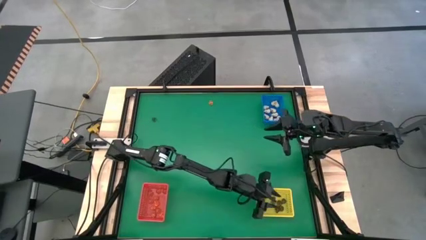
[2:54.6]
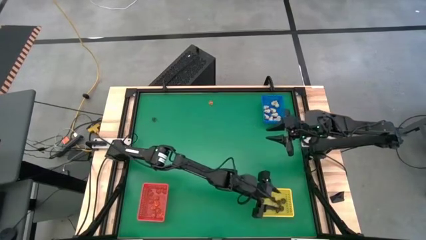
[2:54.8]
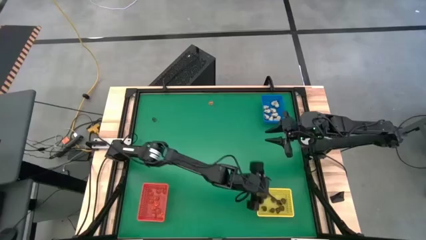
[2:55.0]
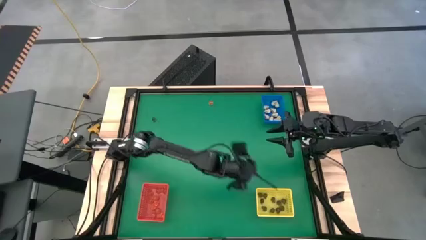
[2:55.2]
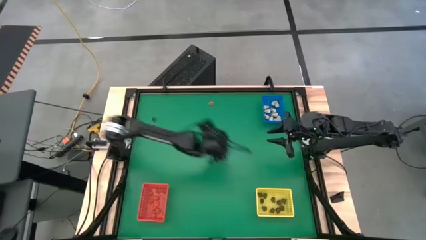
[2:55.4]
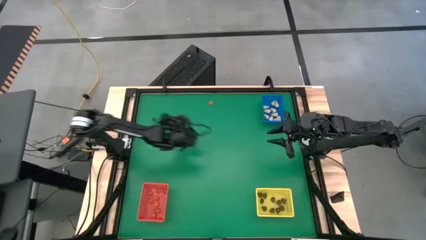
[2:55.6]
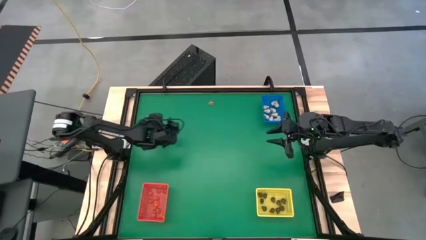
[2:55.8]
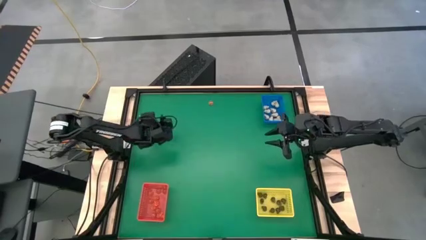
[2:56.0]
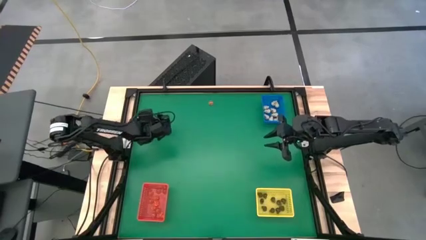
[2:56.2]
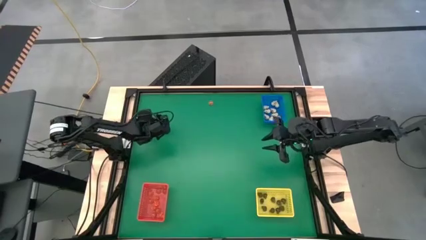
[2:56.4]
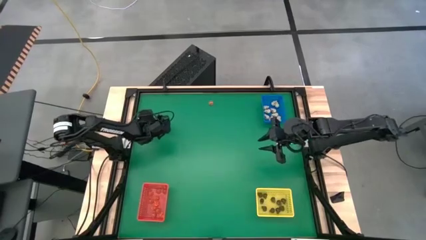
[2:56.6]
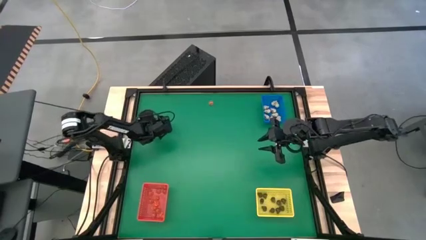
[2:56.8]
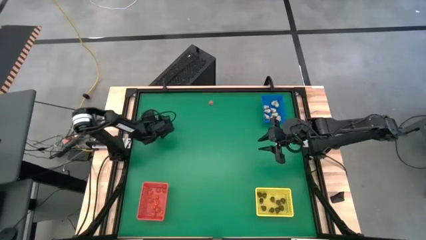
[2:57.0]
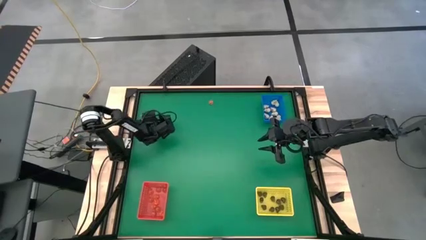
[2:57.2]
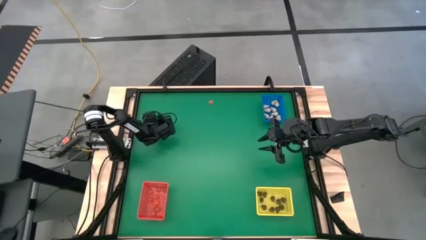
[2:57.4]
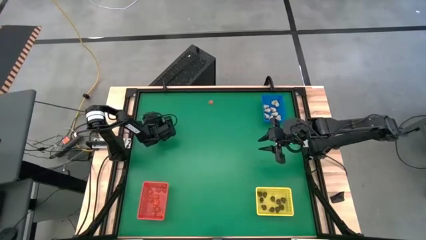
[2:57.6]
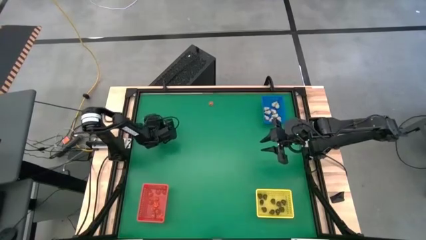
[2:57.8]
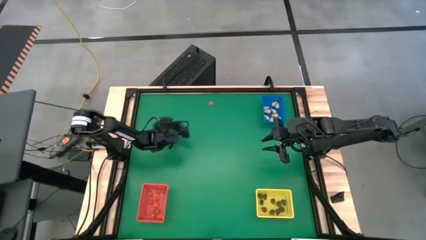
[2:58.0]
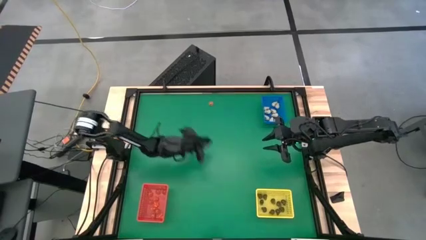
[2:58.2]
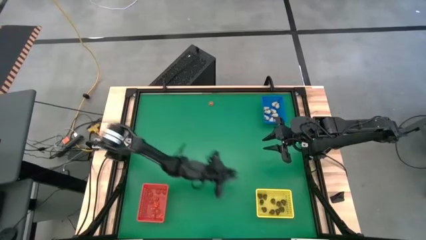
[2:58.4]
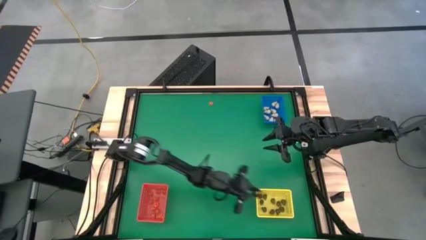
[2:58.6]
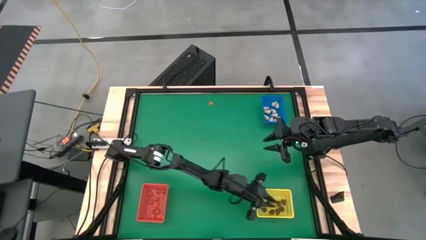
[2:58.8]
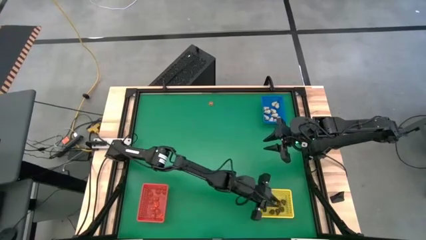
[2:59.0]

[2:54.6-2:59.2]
Task: Sort Halloween decoration
Put the black skull toy into the yellow bin

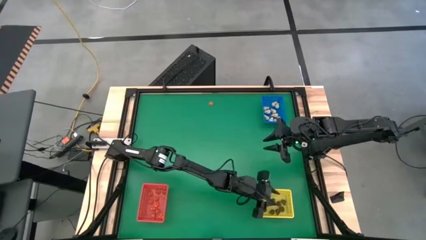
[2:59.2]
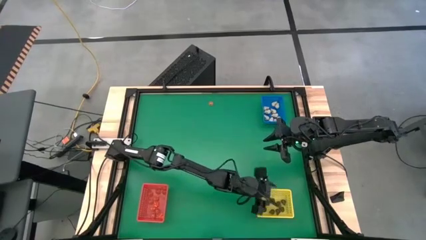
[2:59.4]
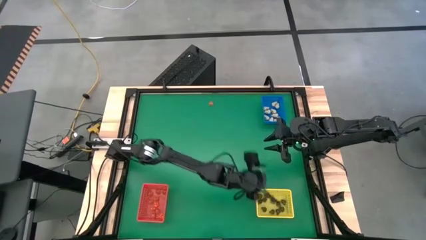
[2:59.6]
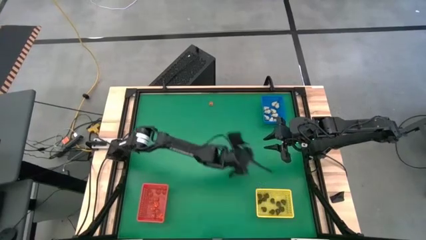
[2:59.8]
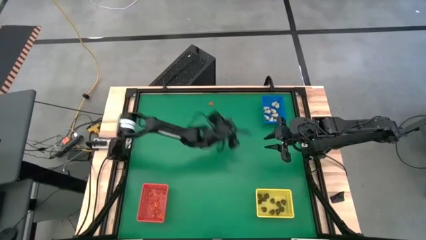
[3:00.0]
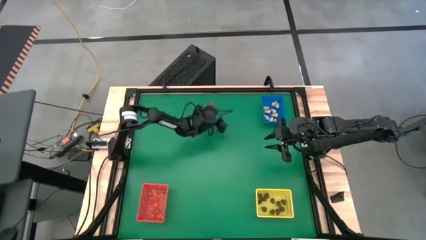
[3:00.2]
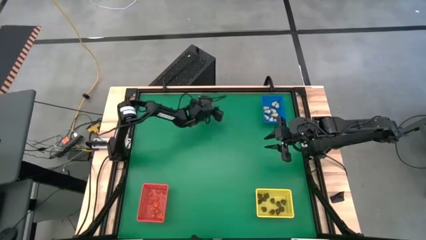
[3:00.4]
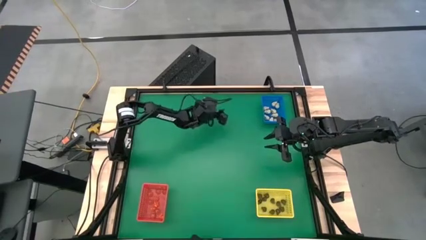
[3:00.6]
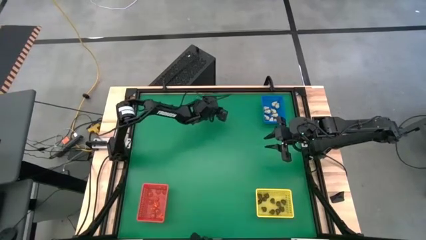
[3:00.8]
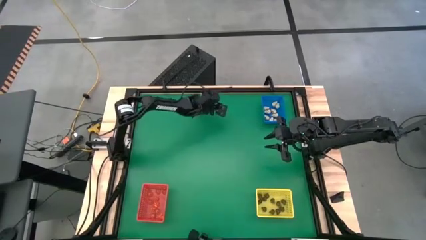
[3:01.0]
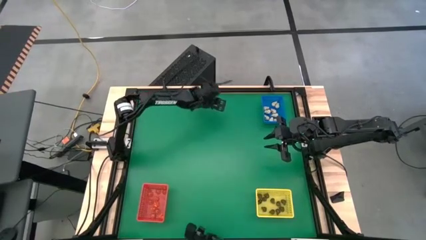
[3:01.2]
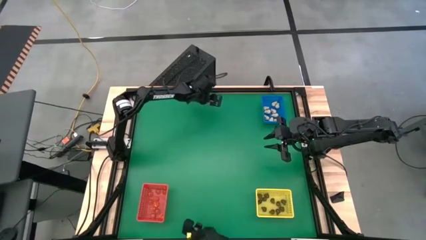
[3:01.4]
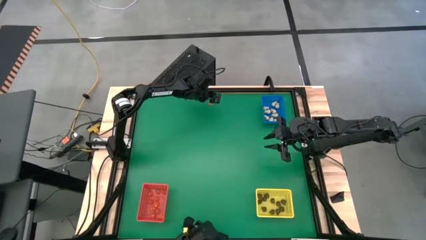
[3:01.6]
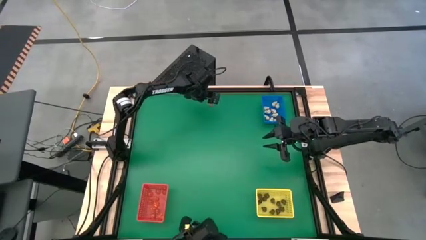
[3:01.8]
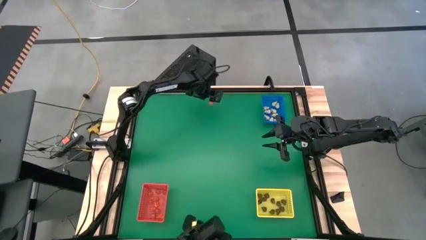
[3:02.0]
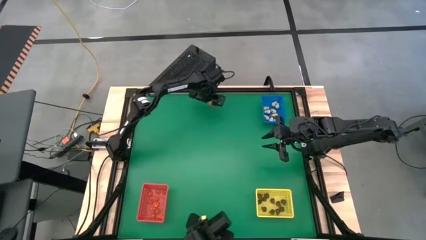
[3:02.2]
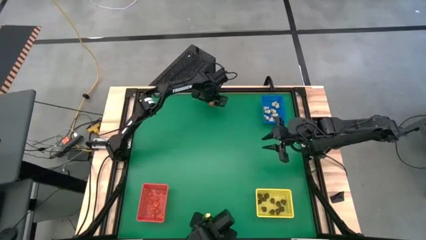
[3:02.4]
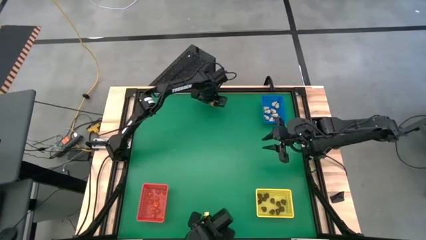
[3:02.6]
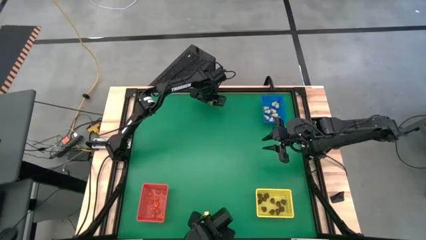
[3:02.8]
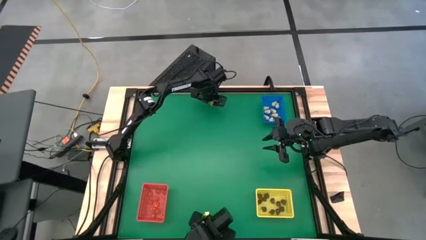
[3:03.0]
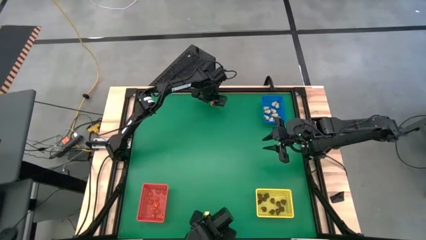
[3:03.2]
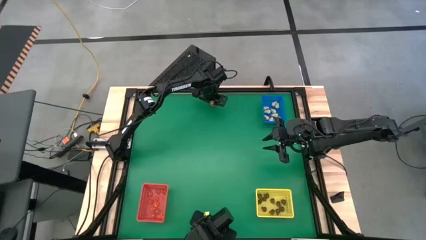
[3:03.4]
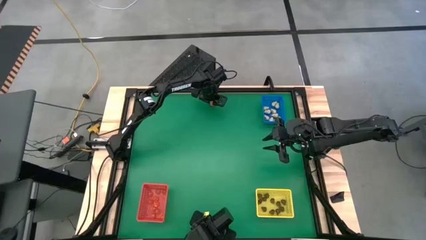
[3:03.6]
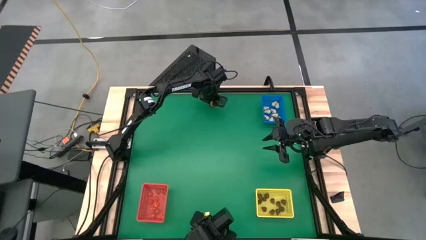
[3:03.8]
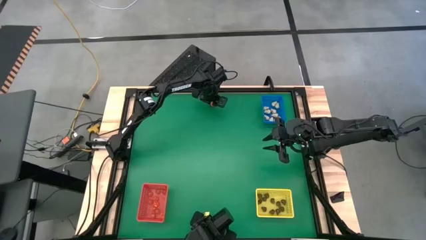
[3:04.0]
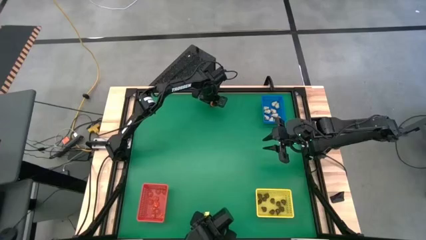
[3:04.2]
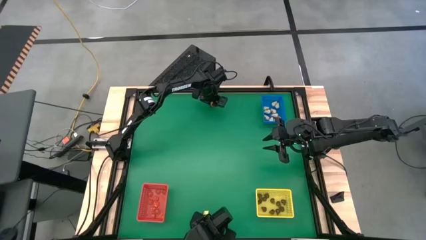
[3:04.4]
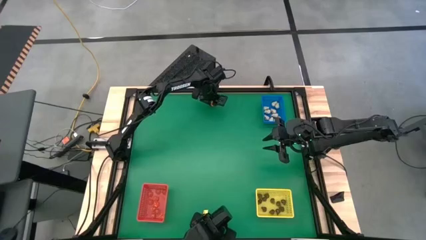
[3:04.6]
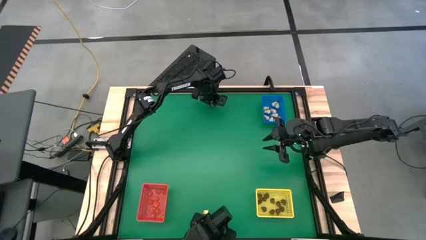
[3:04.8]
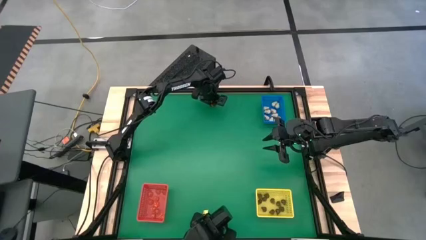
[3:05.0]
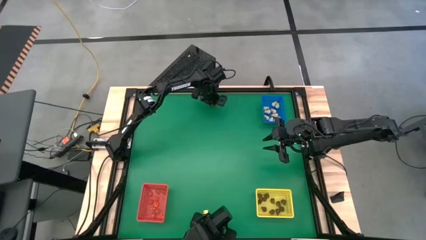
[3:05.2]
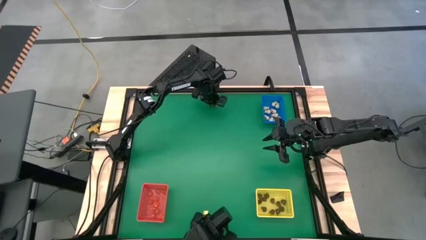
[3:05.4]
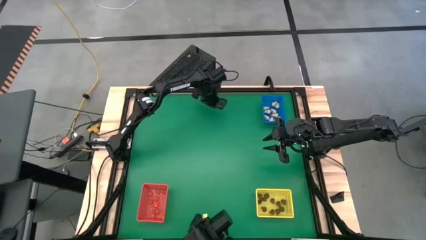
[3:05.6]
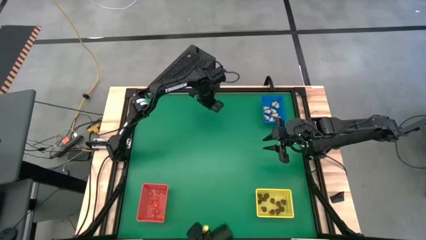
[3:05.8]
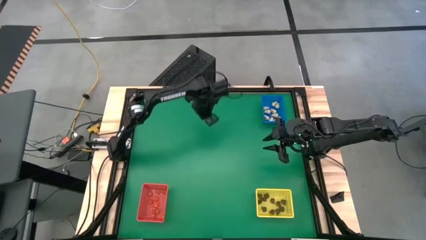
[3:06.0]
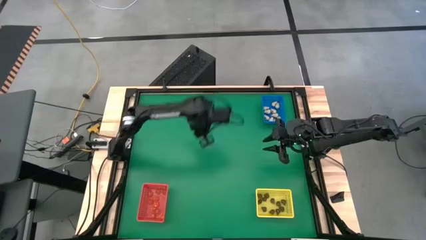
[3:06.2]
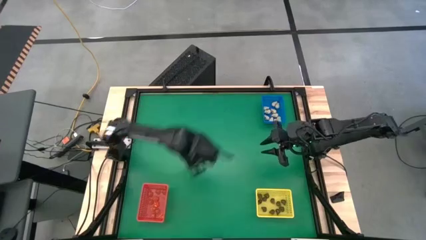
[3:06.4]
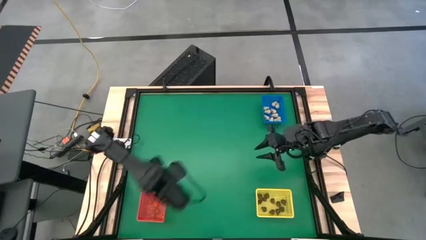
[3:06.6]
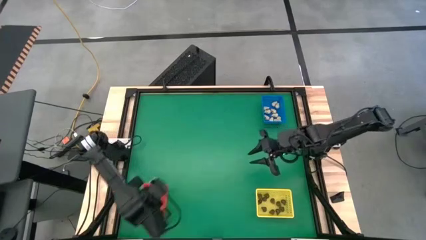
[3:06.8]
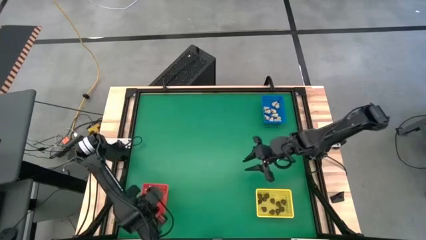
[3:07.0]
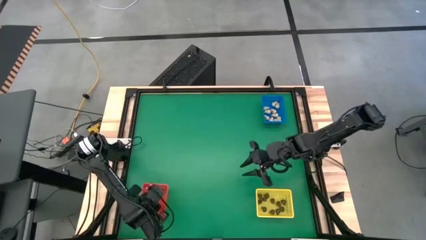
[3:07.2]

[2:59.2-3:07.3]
Put the orange pumpkin toy into the red bin

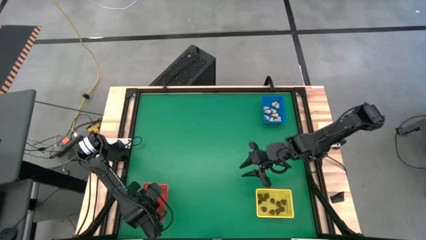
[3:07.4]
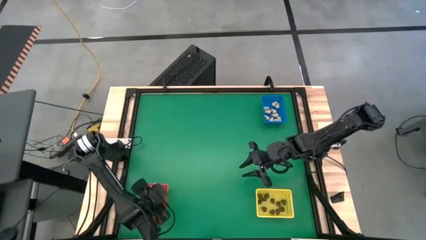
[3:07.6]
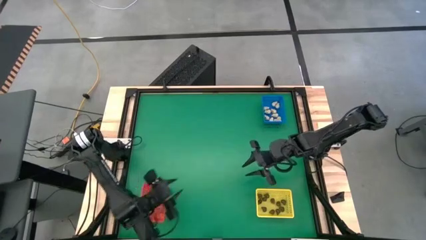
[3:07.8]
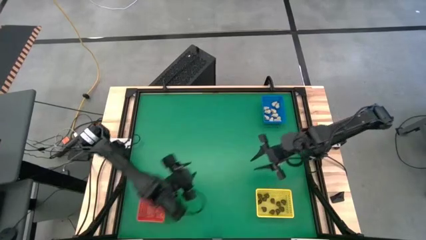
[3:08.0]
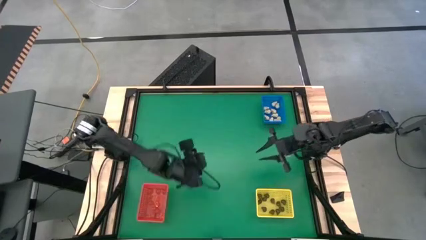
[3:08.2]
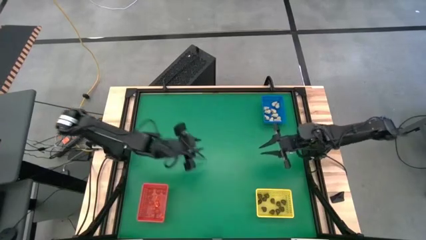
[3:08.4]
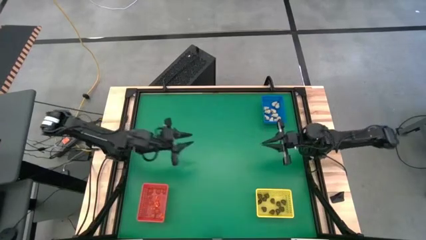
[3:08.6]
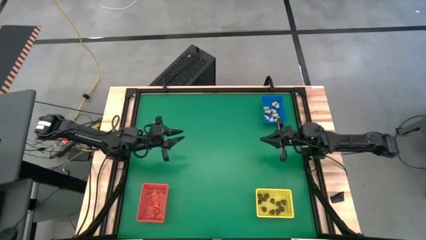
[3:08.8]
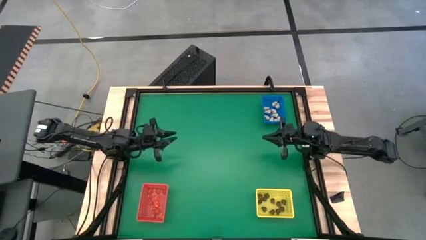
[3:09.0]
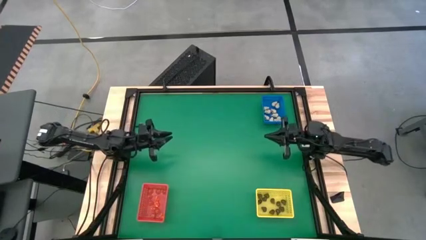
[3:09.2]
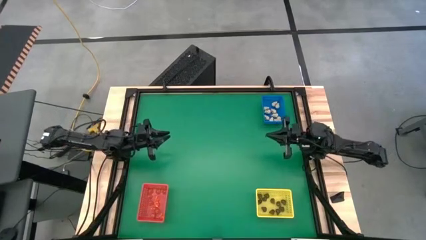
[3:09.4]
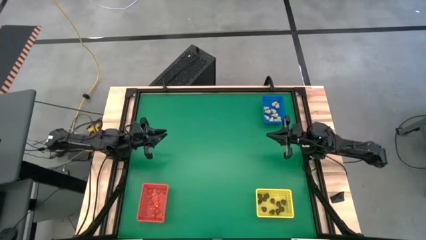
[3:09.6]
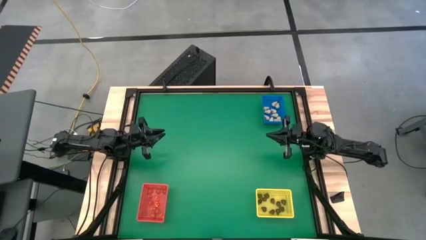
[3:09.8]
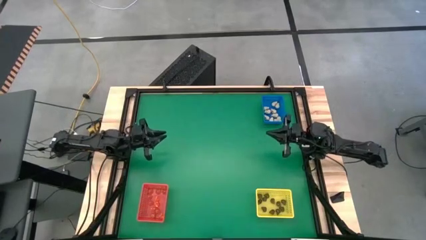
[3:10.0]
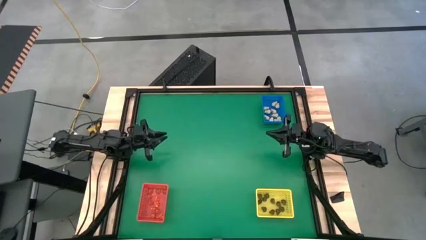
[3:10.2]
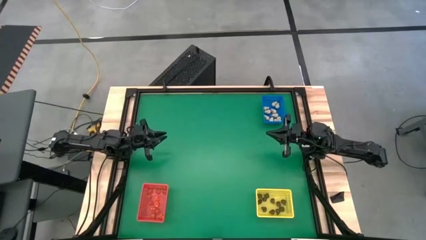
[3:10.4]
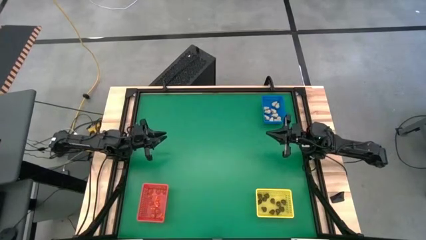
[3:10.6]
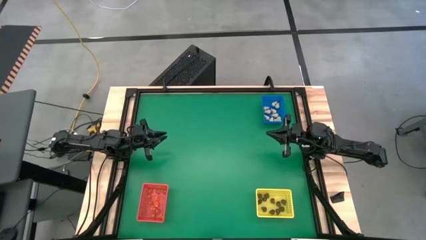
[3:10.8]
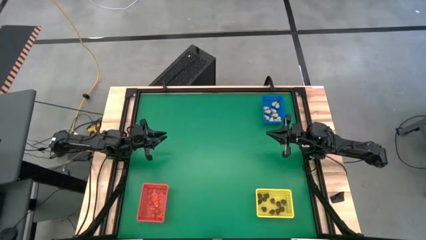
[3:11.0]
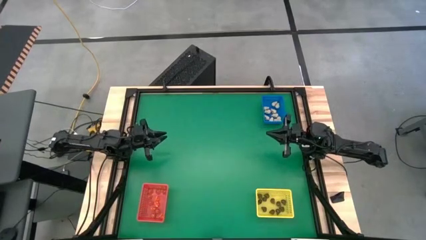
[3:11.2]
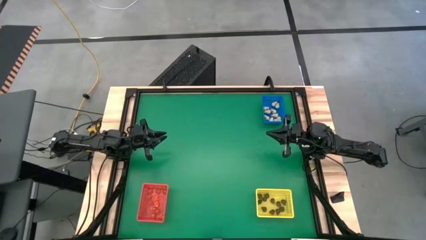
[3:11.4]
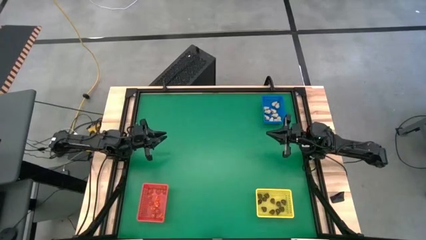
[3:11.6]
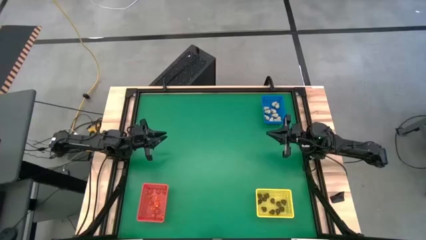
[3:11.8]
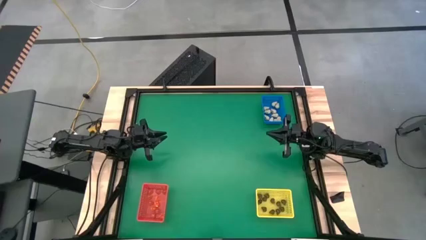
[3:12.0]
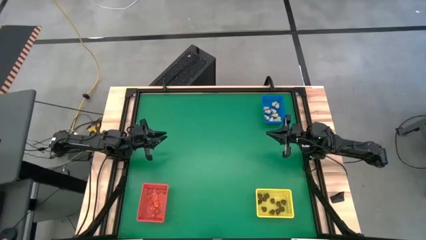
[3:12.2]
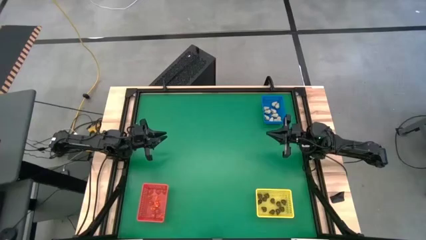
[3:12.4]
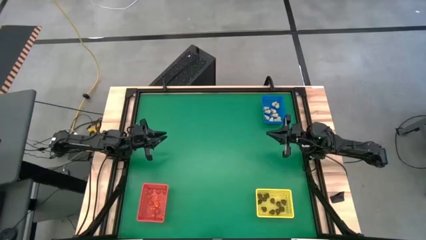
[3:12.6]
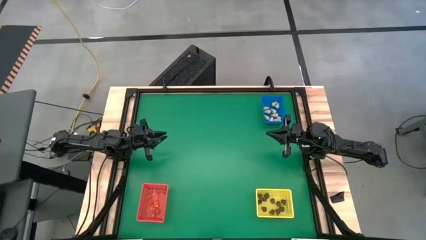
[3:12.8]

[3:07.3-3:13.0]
Return to Home Position
